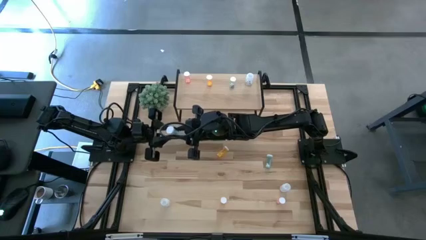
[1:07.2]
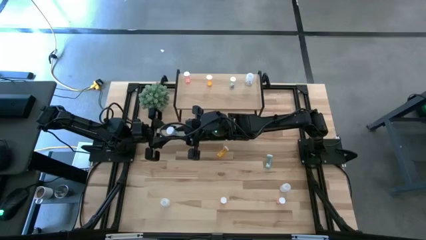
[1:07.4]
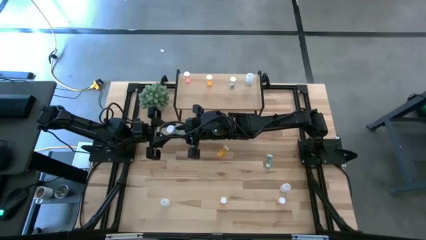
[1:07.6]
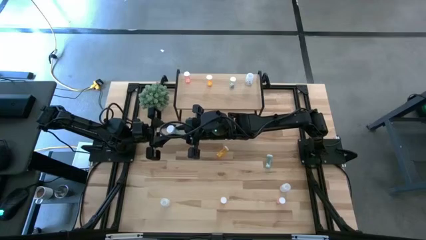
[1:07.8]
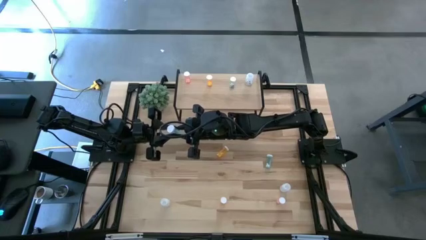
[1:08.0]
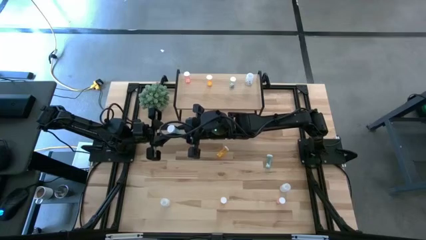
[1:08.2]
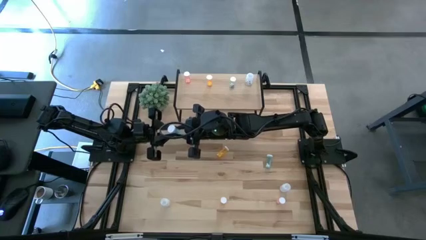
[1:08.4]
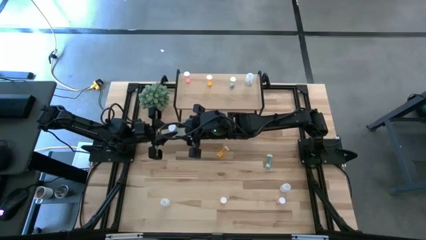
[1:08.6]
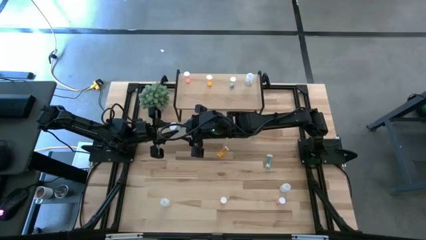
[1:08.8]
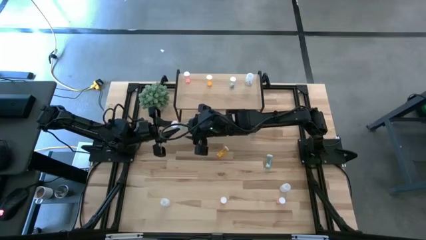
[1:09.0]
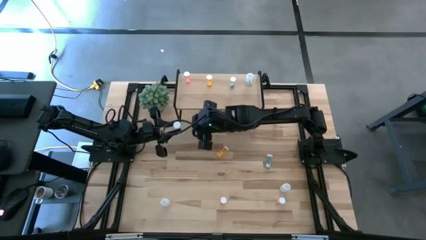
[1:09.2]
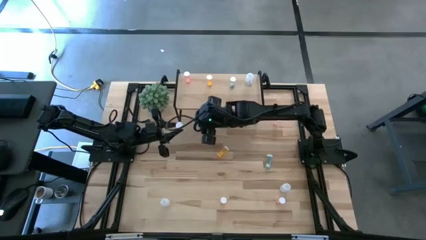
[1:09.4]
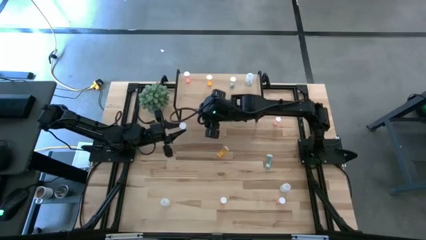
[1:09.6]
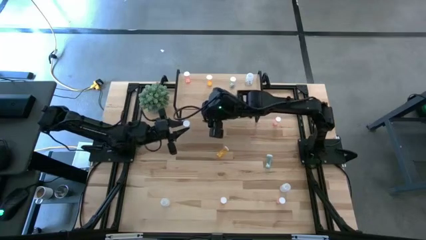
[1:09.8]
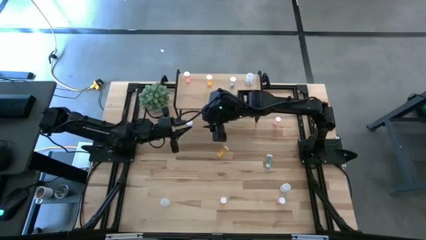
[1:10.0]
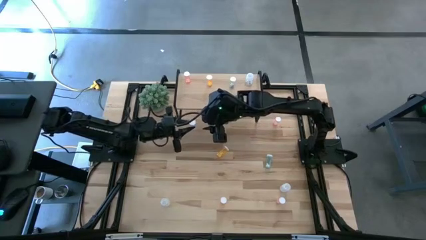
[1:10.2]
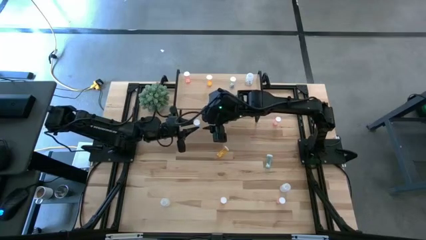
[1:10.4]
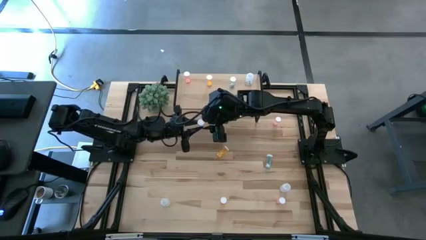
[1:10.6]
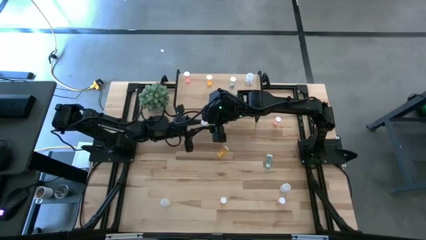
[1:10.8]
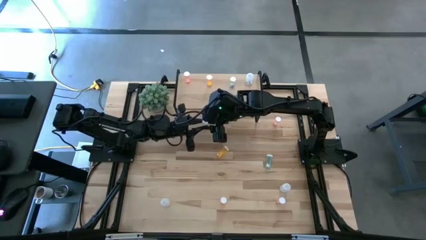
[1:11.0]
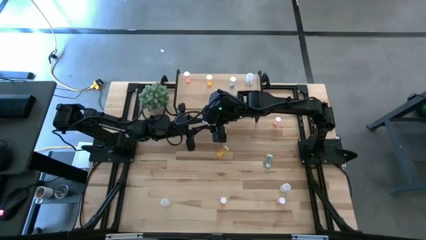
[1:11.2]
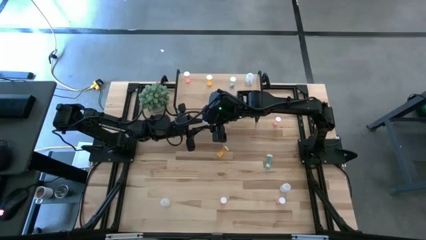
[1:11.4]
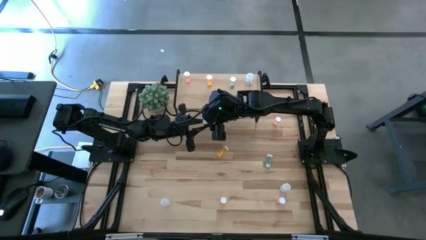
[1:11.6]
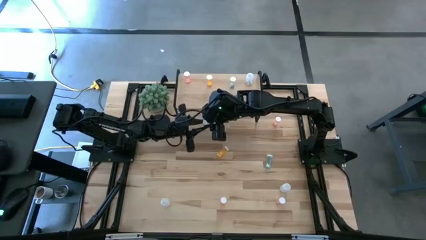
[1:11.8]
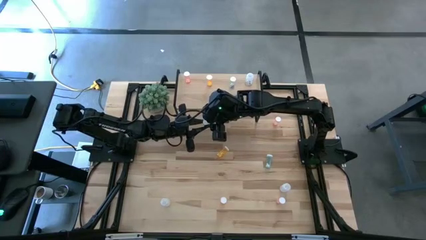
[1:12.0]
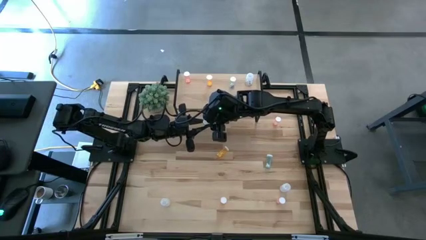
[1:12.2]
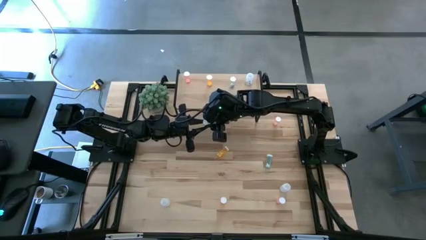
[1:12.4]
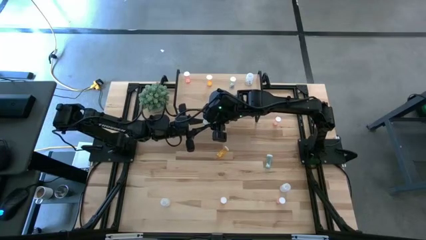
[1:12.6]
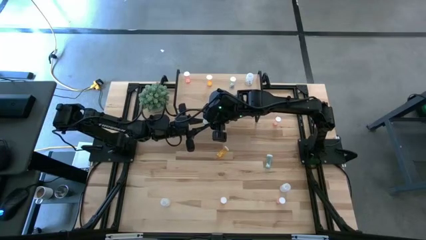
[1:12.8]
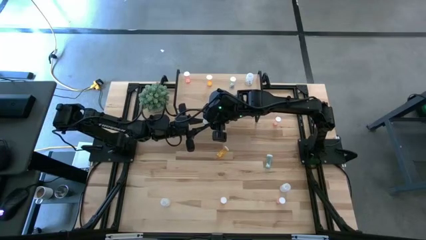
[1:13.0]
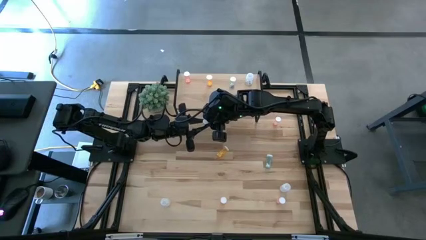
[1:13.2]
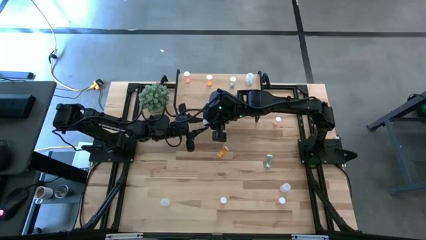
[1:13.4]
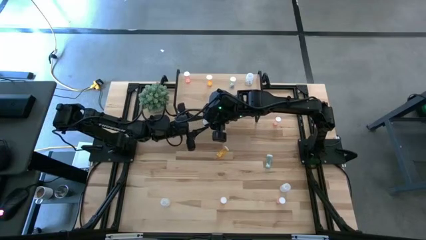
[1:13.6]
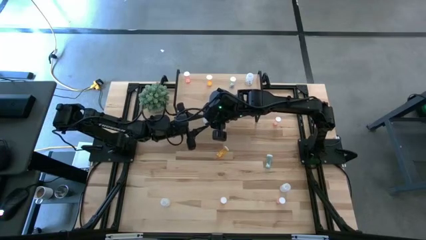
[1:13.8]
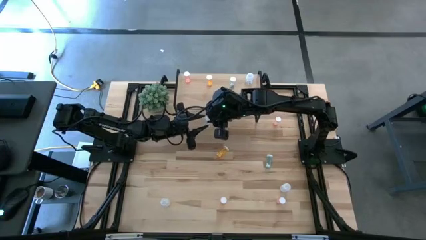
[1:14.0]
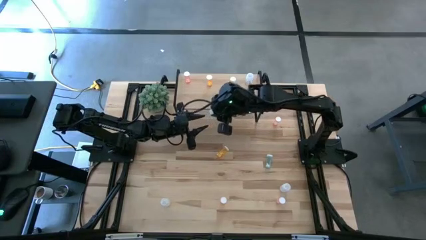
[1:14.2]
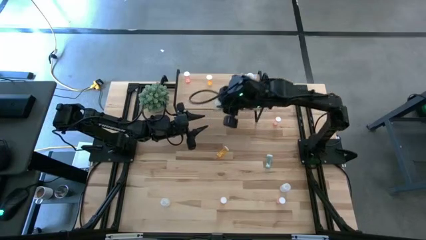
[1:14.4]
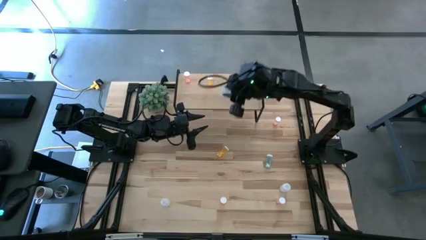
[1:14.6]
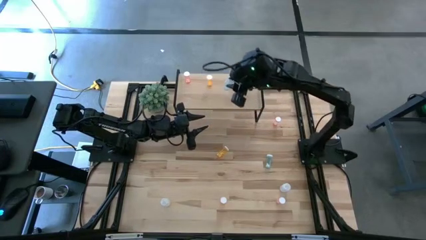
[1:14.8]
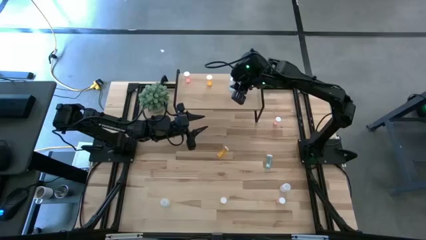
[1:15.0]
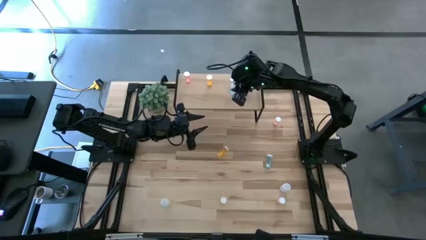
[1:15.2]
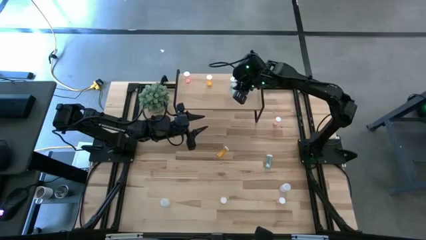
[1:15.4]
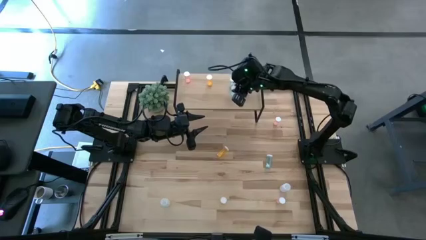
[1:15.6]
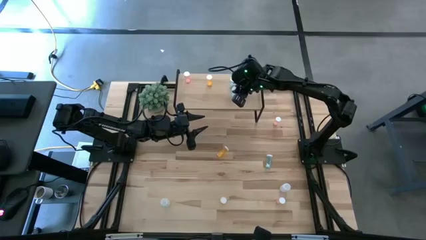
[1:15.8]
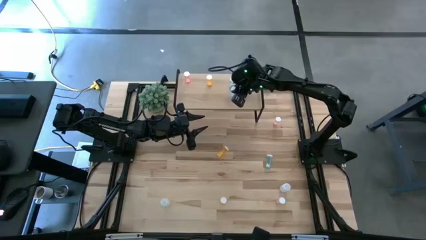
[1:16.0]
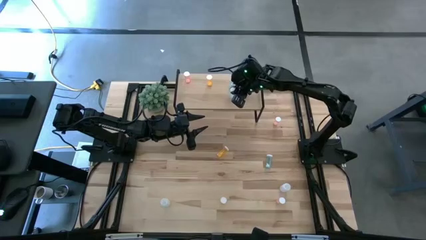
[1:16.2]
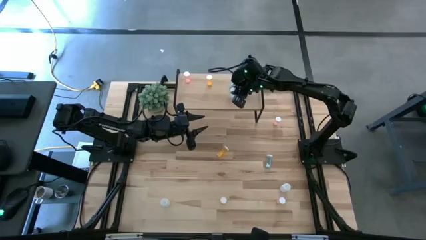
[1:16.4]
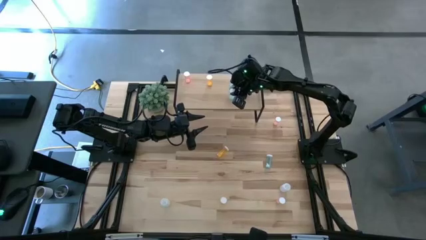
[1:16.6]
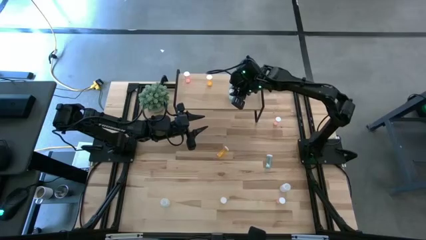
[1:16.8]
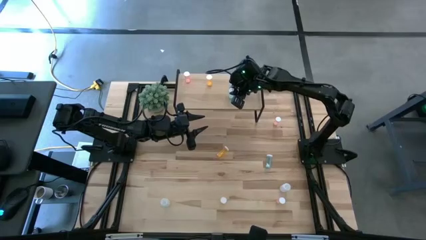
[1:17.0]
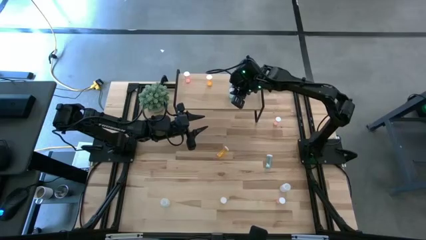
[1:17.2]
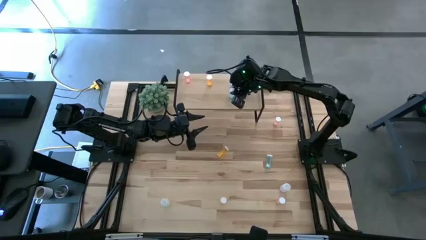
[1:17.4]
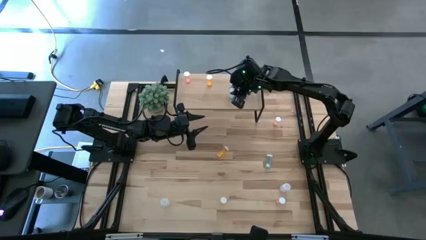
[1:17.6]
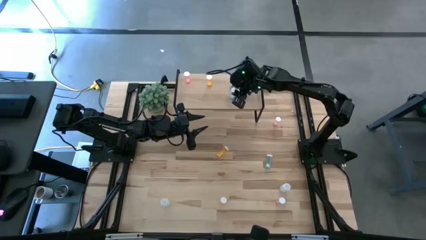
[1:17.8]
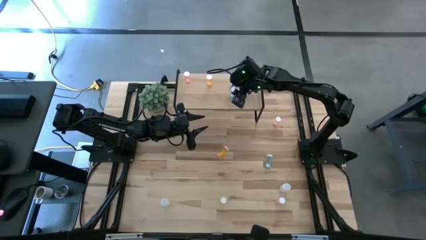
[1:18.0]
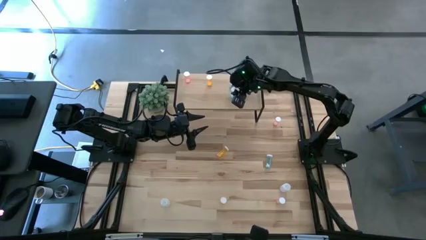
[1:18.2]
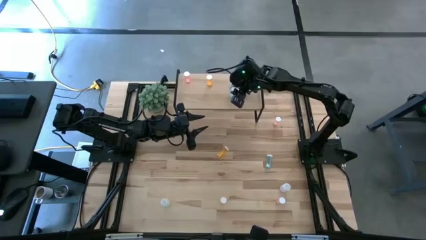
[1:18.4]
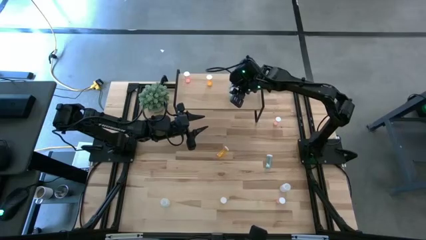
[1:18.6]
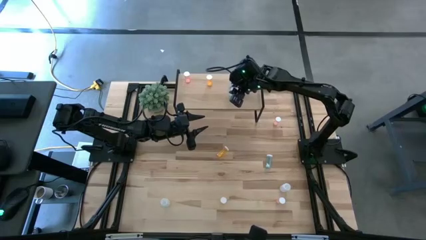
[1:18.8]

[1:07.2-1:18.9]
Task: Pick and place medicine bottles onto shelf by color
Put the left blue pill bottle on the shelf aligned with the other blue pill bottle

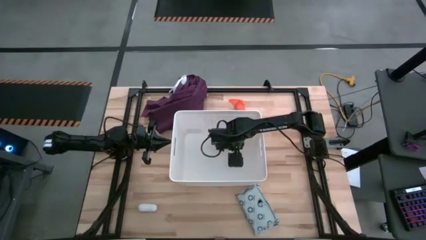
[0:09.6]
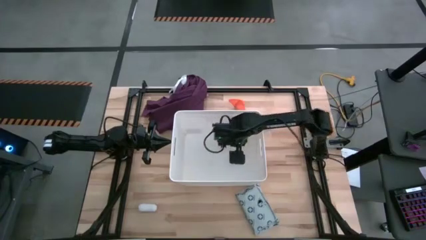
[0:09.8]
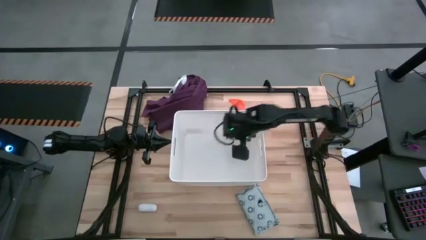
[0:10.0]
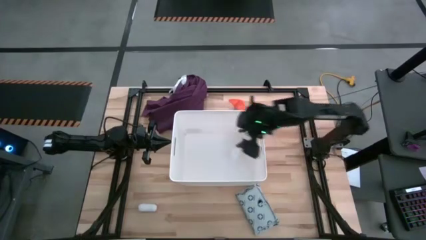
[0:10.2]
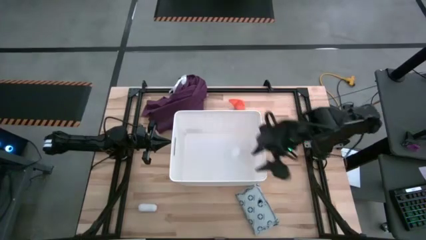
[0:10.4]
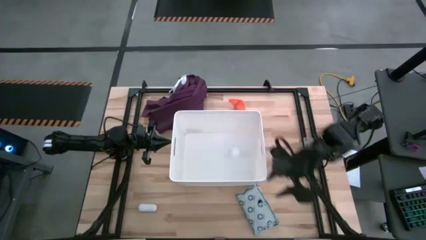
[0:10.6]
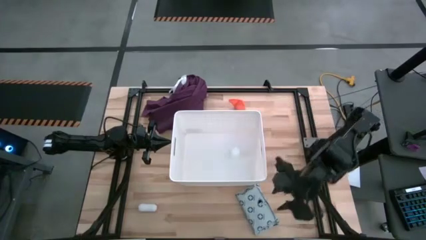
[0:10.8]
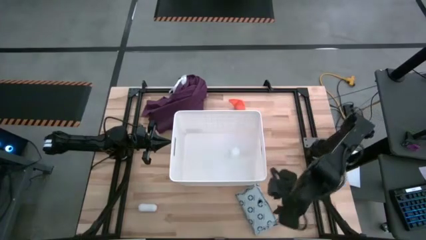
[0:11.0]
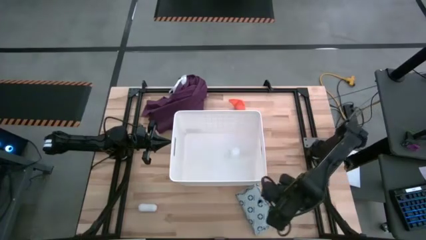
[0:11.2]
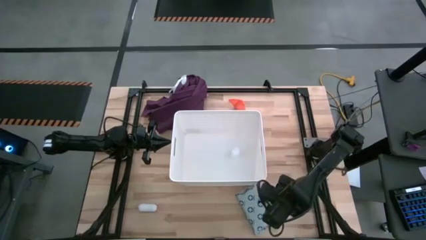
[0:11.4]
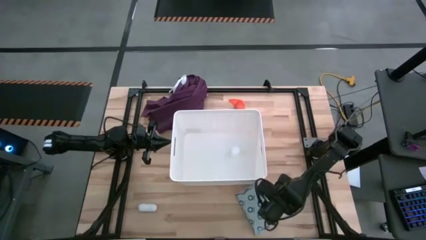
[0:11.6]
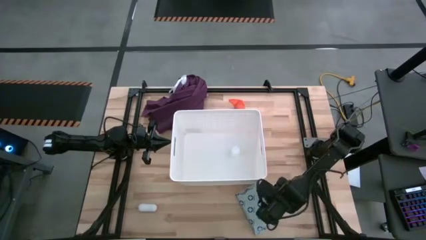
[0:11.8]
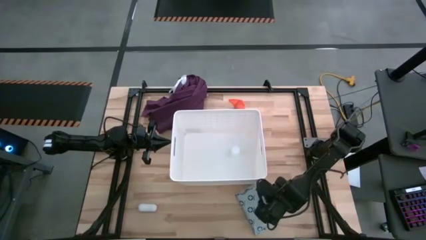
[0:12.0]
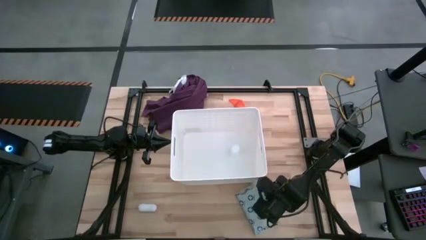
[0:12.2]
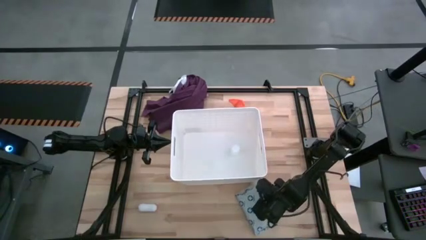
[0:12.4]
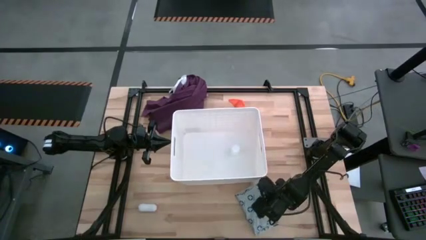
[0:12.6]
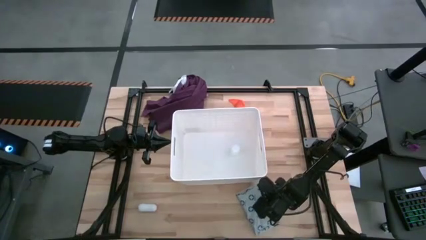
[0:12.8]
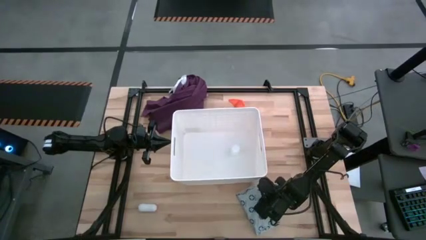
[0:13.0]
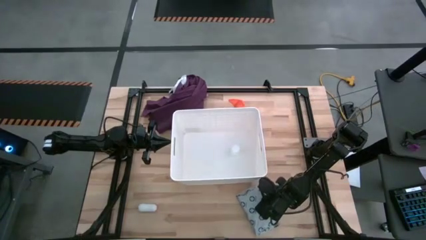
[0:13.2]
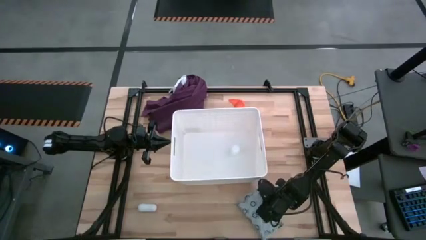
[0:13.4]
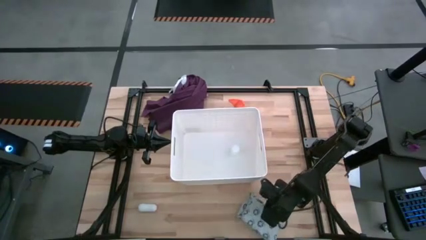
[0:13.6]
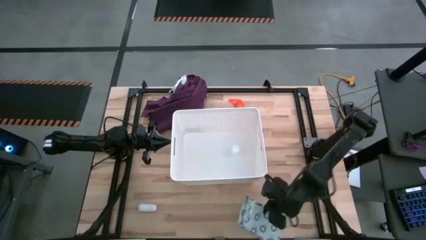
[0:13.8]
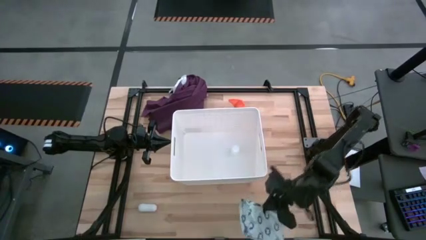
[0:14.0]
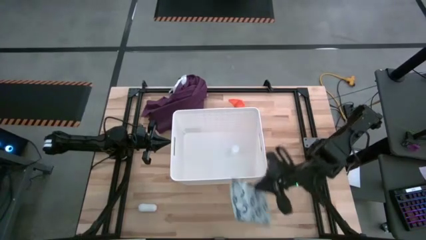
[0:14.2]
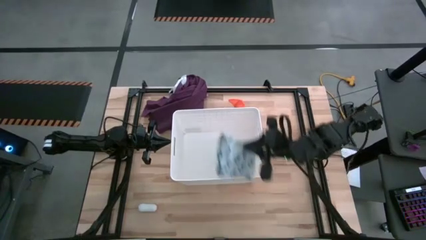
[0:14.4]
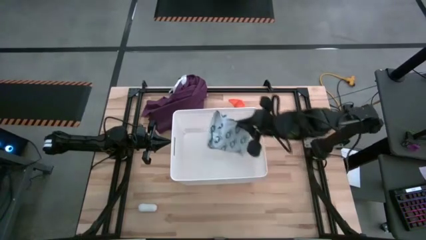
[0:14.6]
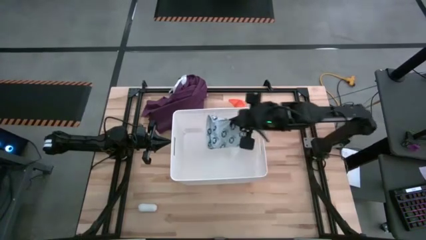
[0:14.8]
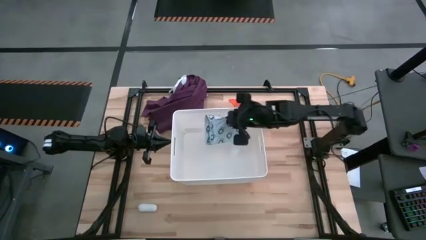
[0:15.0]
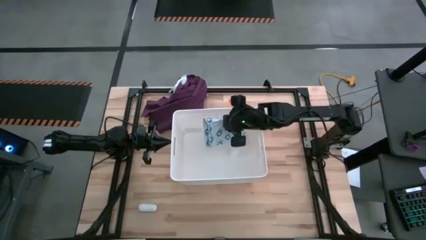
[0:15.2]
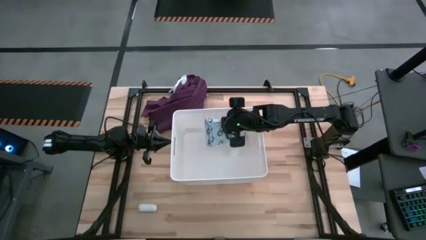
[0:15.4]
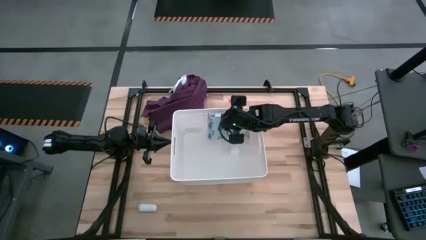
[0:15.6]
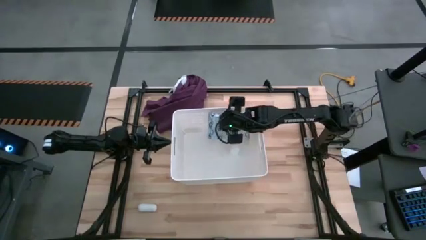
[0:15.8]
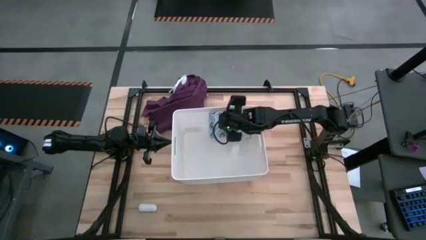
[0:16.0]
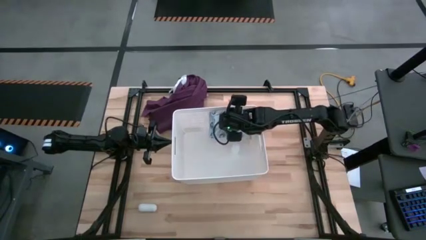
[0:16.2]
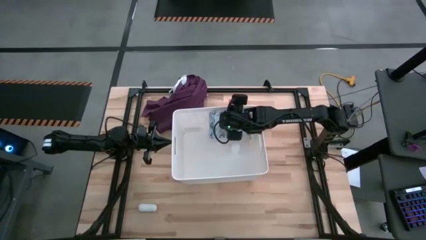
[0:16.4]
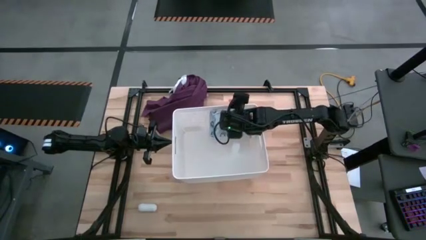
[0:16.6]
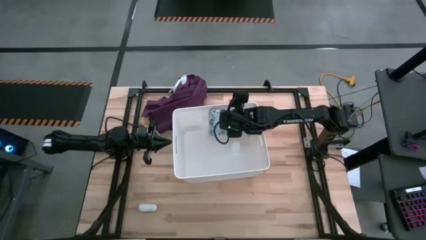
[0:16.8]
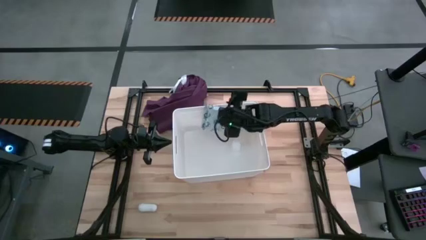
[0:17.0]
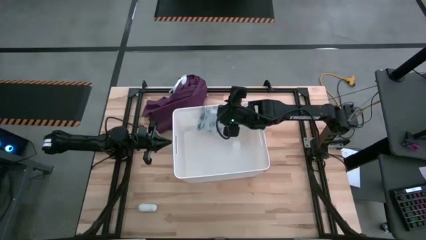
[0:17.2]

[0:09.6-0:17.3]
Task: Pick & place medical supplies in basket/bin
Put the light blue mailer bag into the white bin
